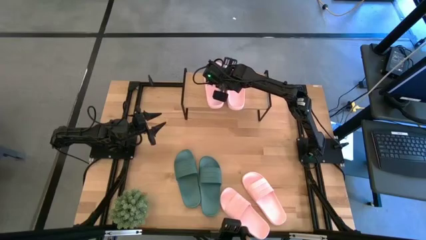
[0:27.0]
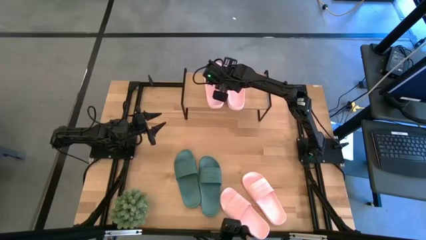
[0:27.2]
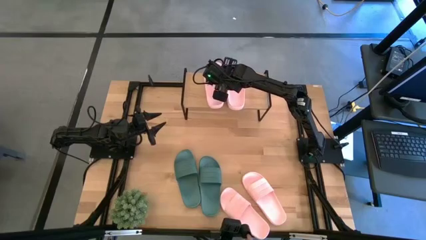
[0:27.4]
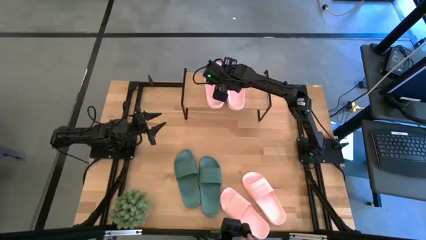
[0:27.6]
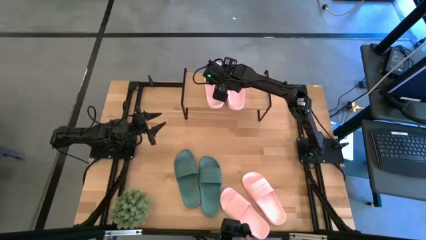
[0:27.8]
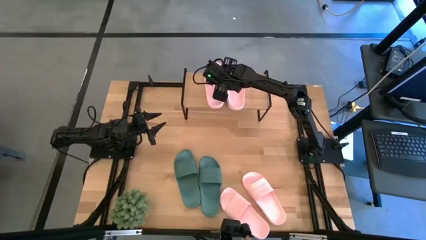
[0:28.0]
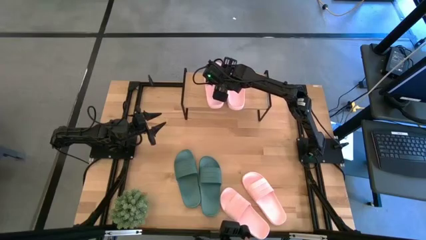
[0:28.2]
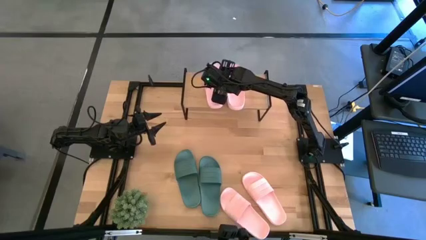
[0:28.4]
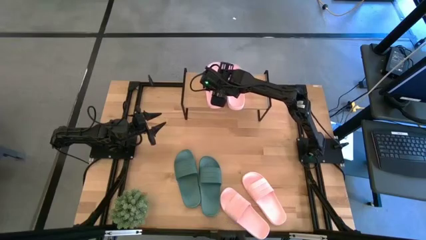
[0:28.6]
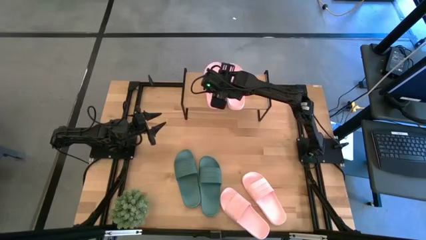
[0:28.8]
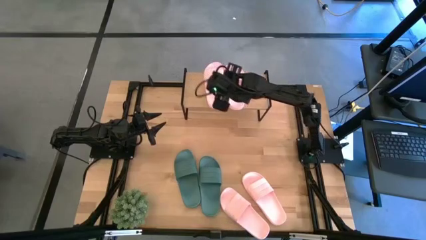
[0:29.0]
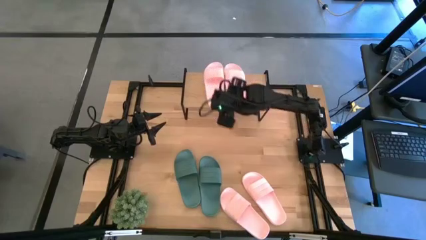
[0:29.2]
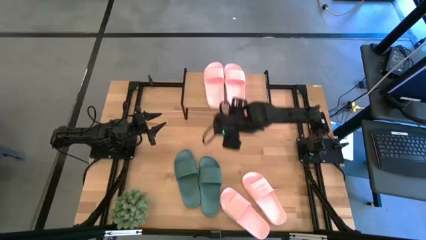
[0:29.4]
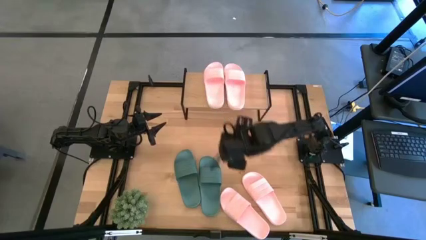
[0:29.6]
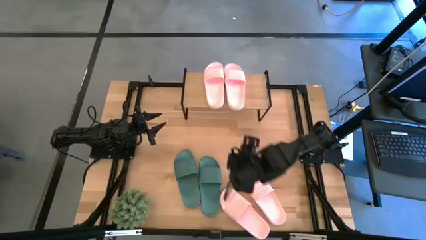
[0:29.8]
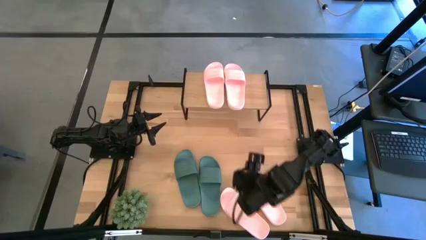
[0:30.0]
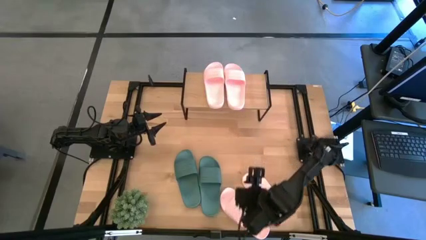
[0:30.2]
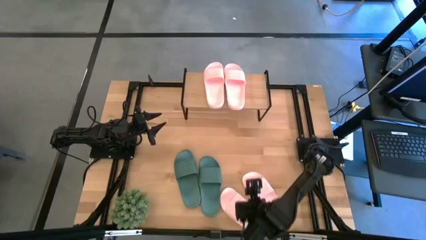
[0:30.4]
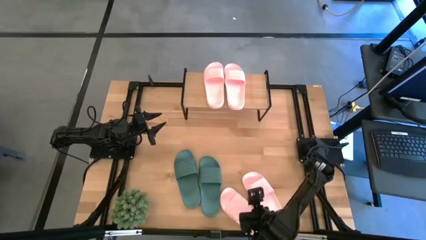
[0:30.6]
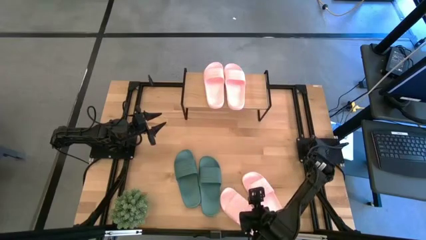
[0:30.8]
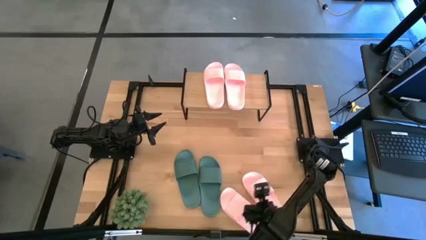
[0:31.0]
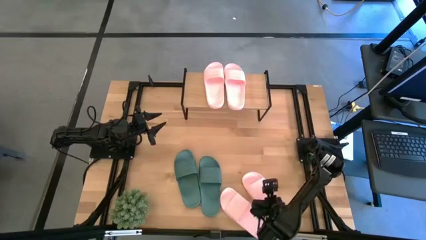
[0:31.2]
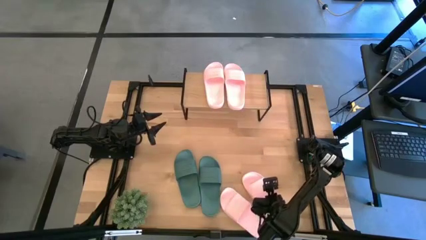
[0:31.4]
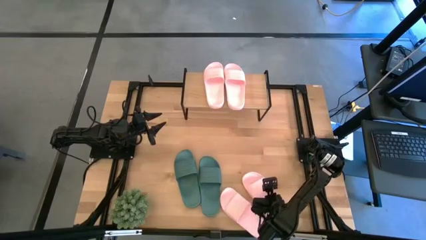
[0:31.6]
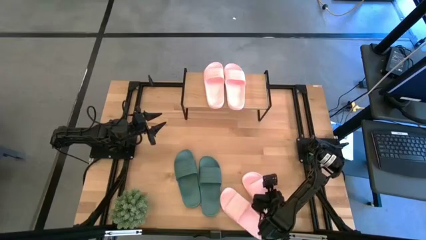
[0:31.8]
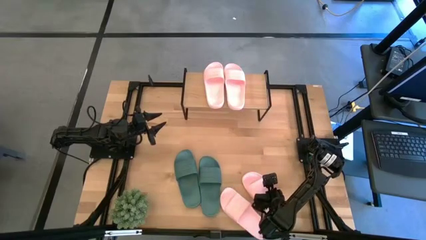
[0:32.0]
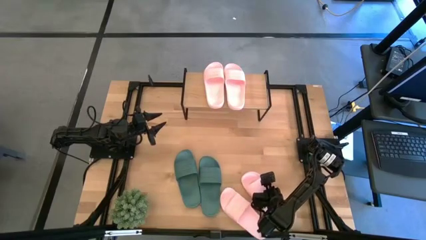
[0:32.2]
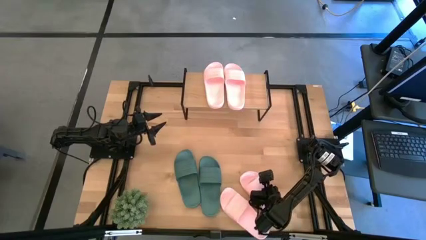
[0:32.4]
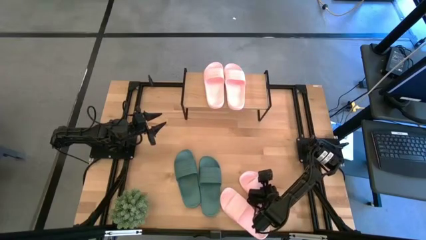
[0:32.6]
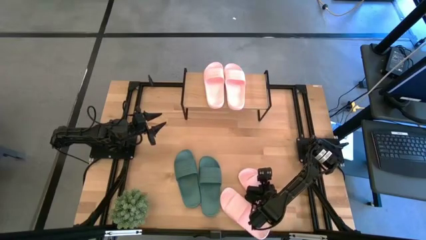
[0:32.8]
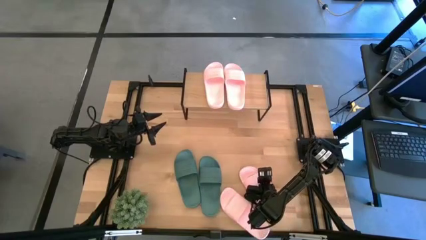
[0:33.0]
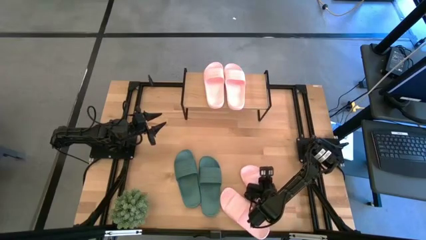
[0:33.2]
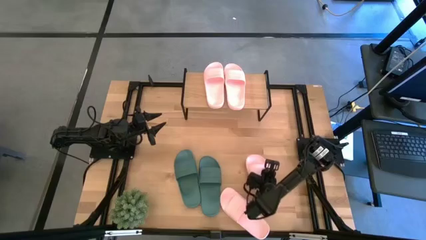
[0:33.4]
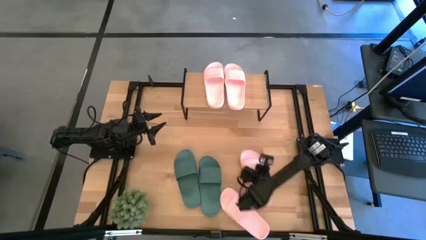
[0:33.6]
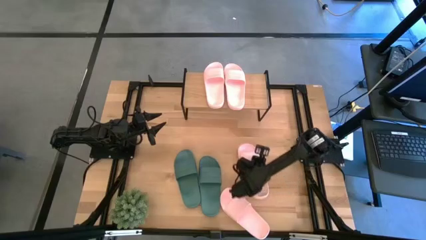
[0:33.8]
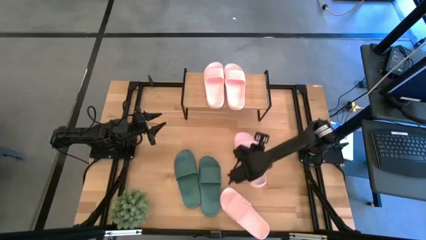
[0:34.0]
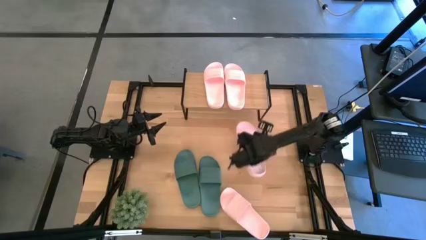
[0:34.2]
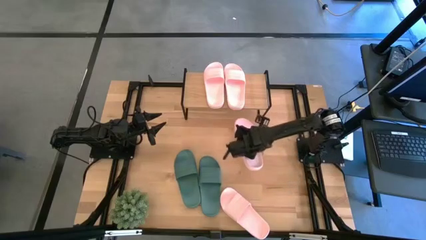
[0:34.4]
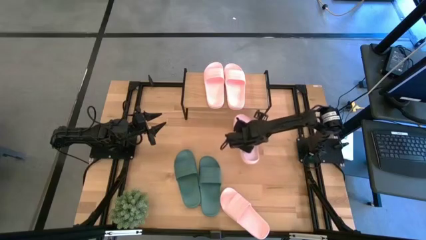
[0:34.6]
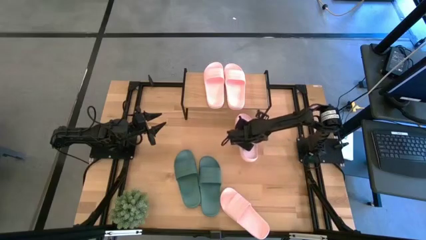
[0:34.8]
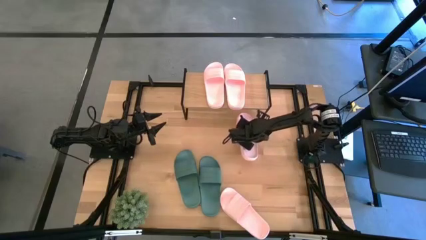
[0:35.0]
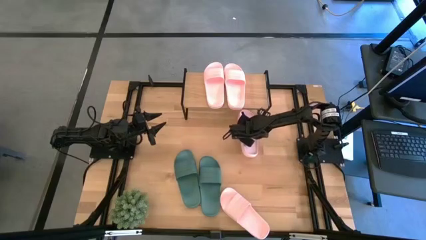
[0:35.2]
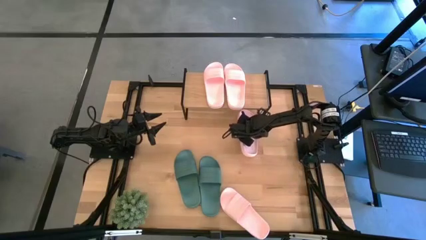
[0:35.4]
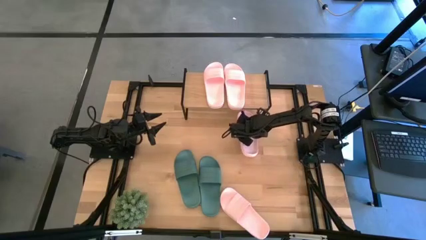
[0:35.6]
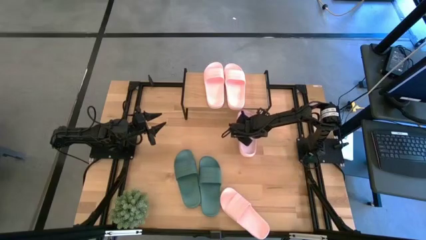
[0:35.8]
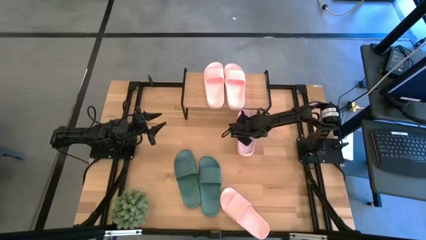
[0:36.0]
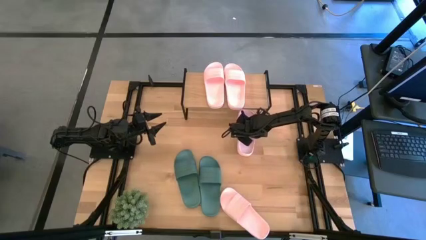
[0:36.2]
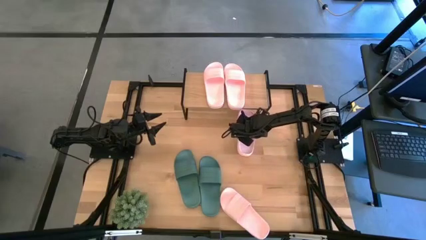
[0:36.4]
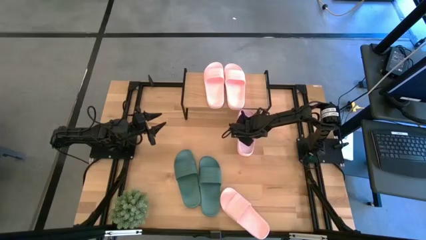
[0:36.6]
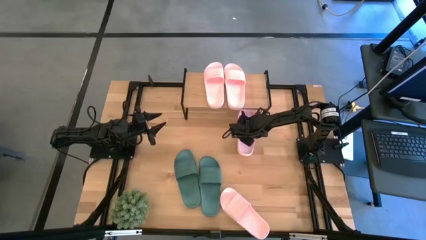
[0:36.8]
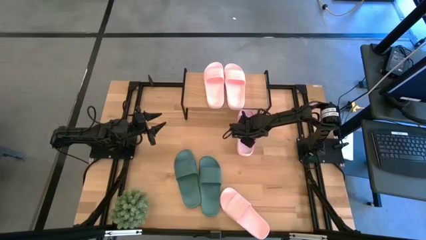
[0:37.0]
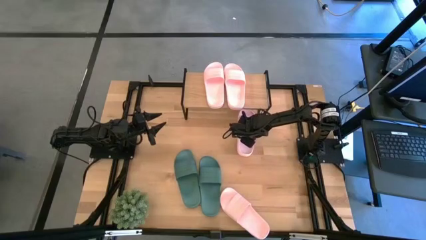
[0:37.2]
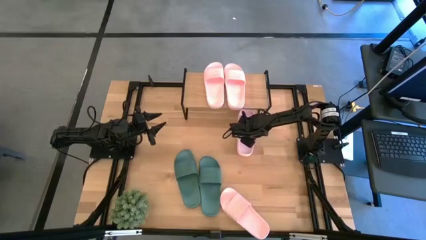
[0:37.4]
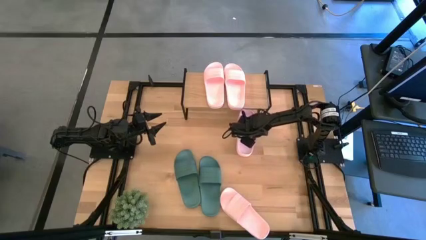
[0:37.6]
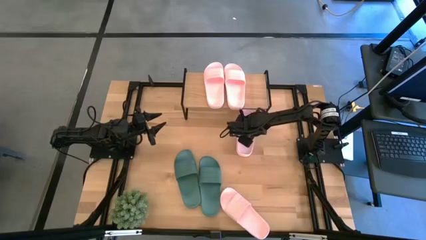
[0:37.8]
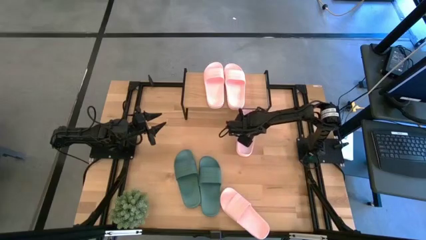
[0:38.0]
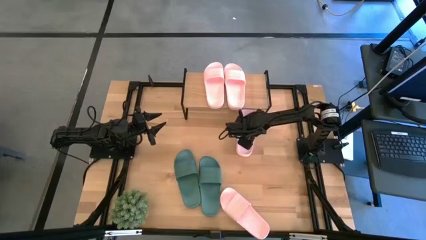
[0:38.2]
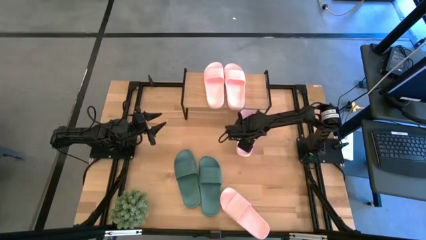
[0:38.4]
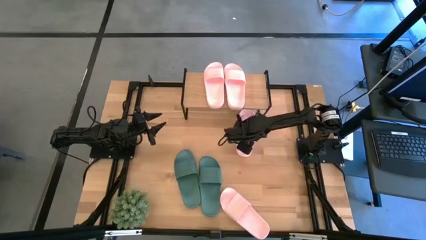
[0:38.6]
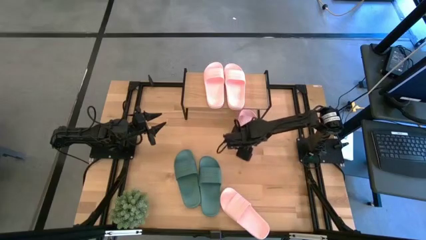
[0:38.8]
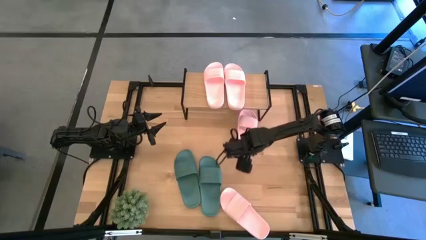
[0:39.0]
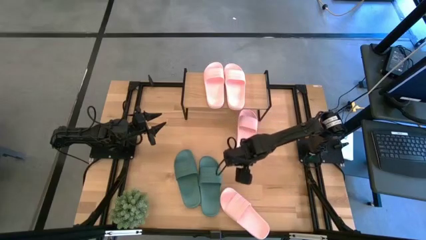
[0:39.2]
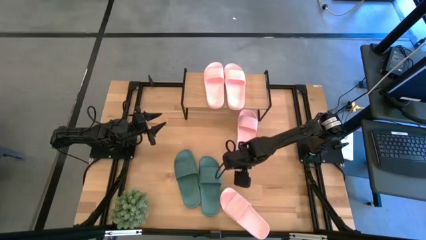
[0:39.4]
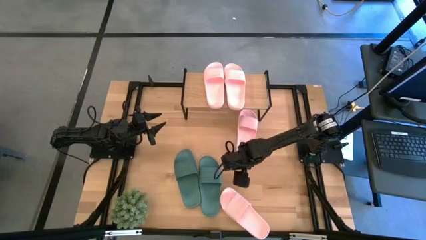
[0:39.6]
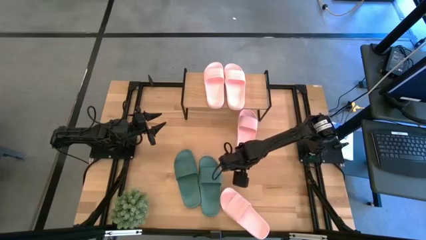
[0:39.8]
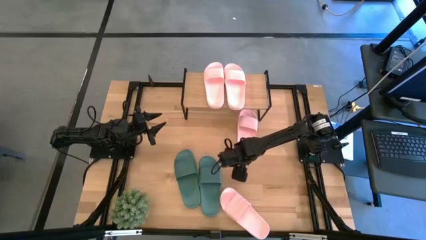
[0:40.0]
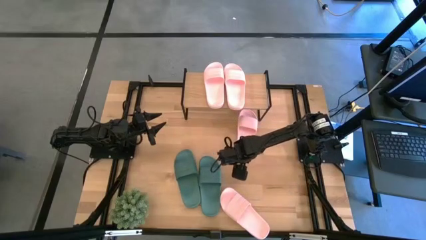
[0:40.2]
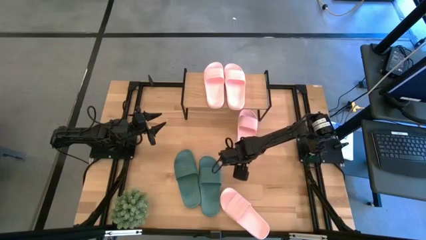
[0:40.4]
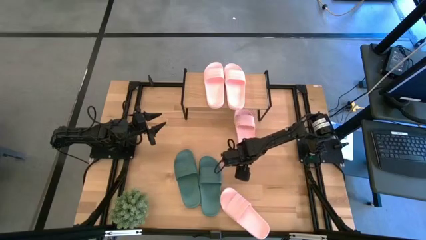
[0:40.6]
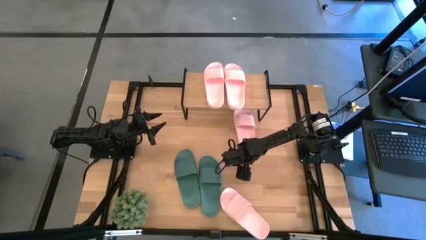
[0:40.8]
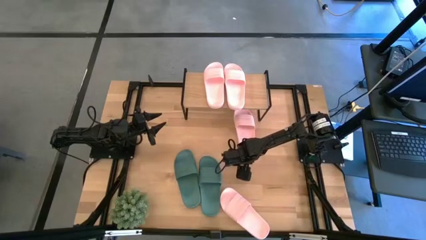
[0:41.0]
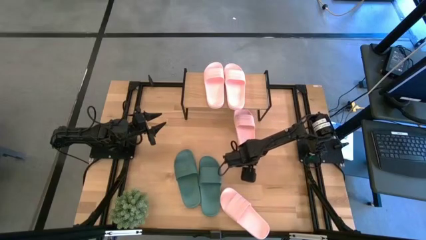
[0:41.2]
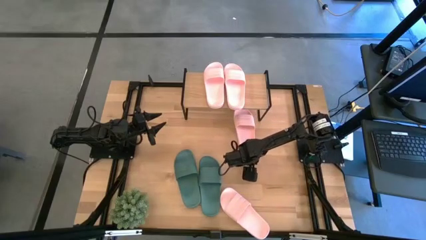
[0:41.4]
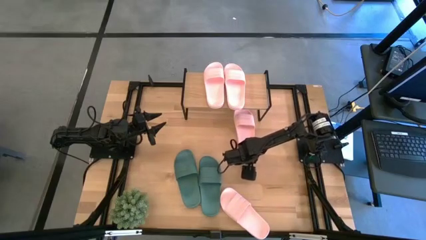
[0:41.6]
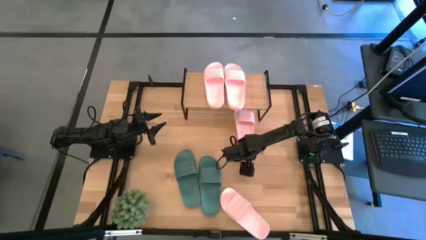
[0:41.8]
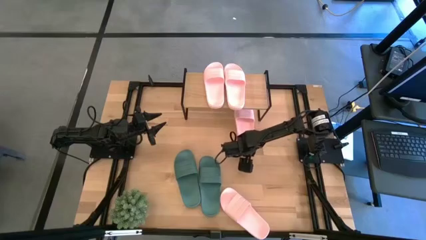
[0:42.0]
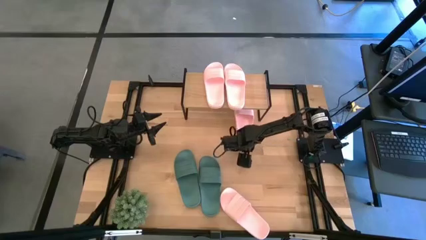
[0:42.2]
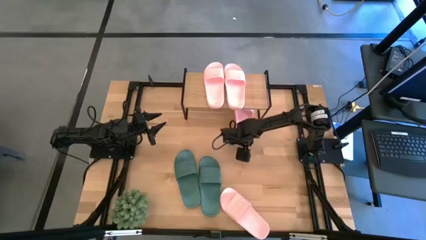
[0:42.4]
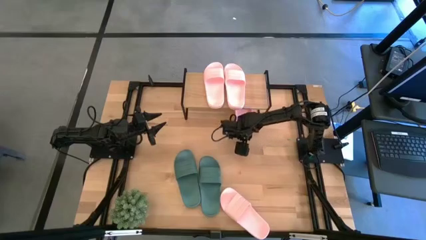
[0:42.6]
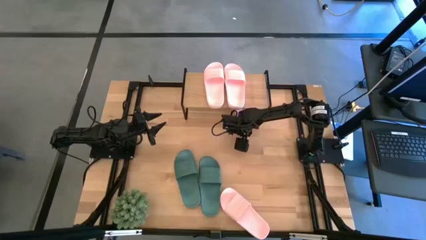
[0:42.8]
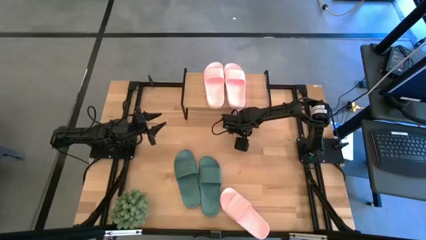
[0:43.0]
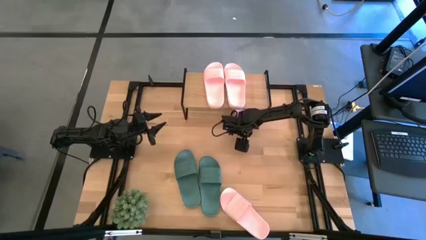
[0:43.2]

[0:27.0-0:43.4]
Task: Pick and place slides into the shelf
Put the pink slide under the shelf
